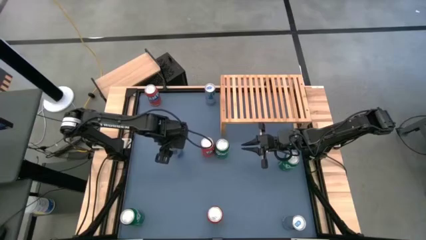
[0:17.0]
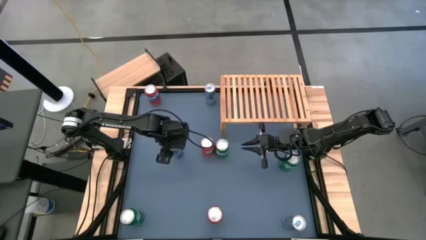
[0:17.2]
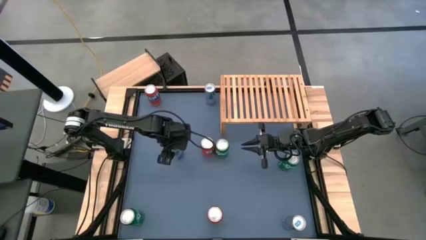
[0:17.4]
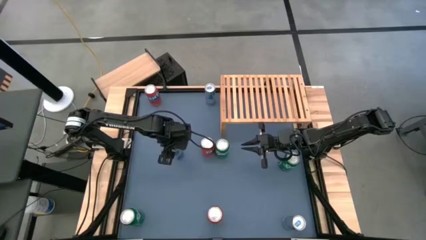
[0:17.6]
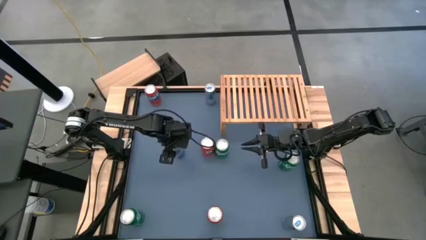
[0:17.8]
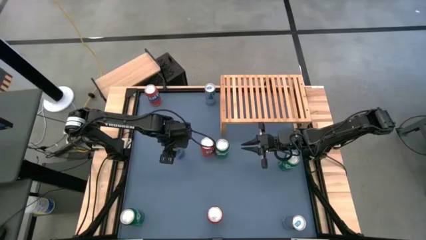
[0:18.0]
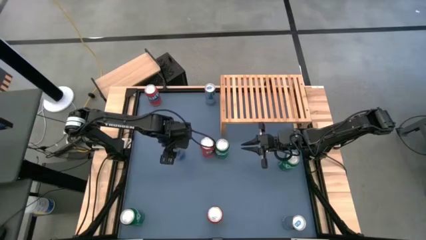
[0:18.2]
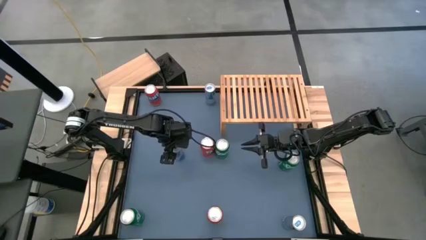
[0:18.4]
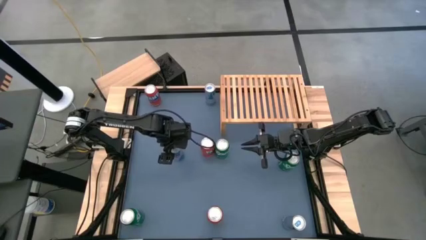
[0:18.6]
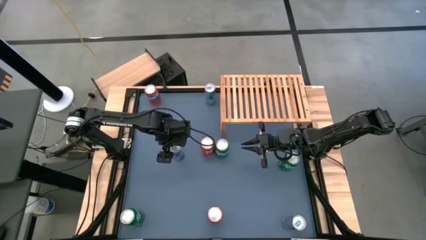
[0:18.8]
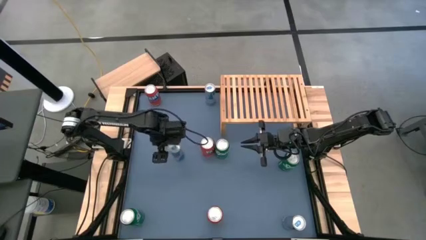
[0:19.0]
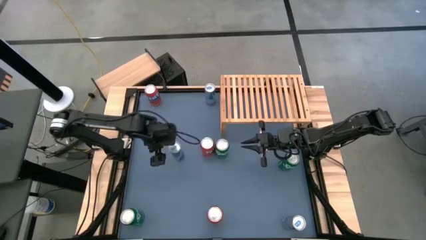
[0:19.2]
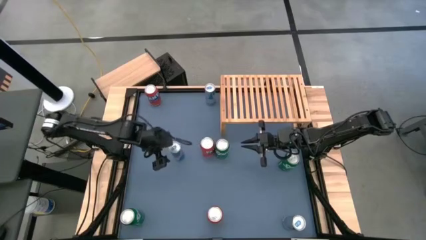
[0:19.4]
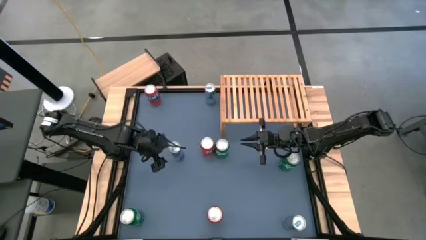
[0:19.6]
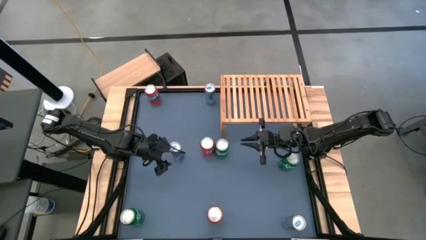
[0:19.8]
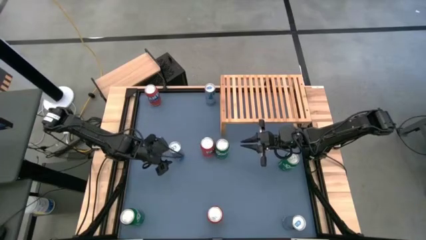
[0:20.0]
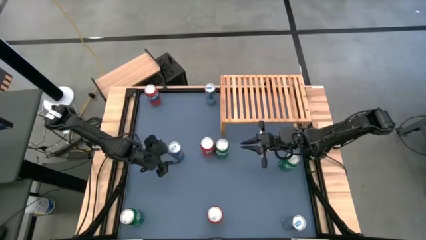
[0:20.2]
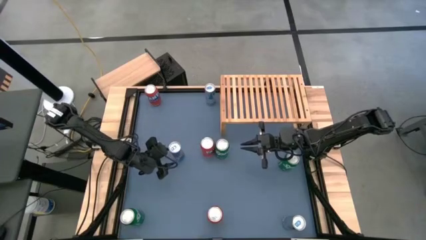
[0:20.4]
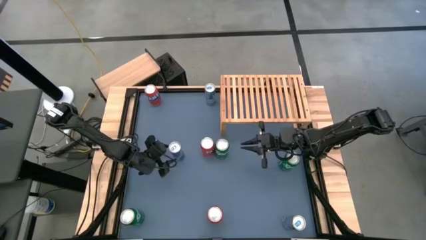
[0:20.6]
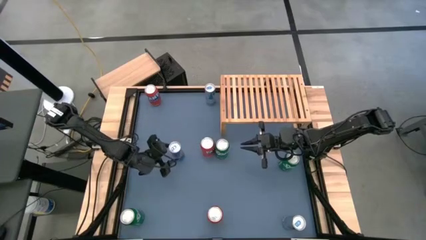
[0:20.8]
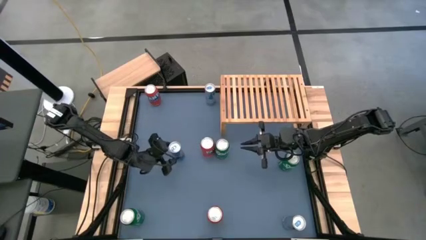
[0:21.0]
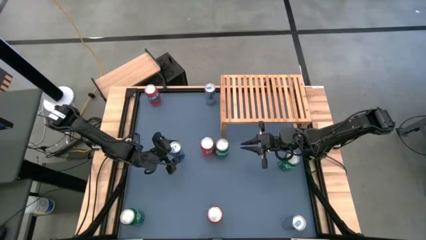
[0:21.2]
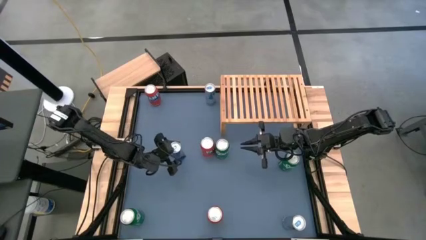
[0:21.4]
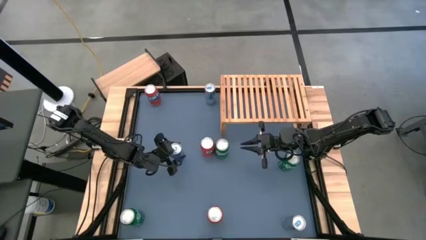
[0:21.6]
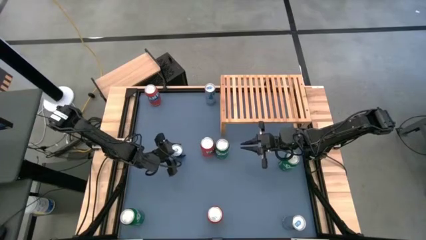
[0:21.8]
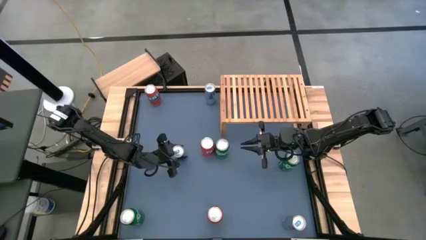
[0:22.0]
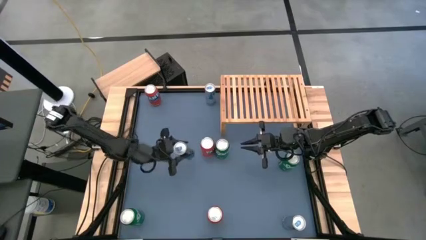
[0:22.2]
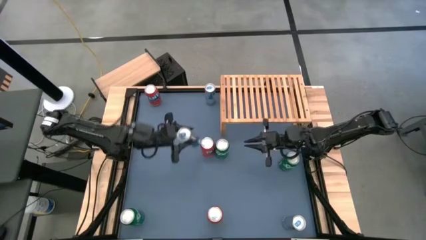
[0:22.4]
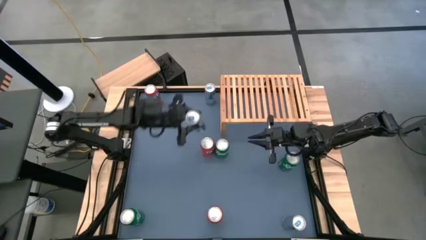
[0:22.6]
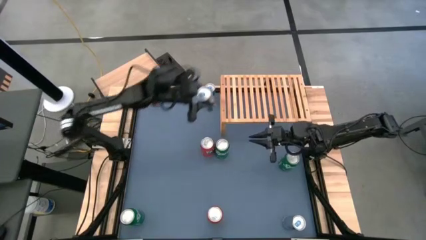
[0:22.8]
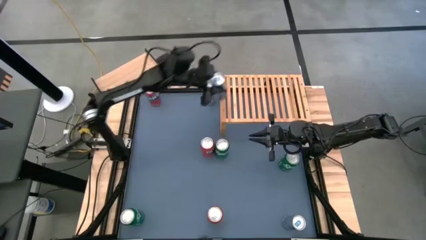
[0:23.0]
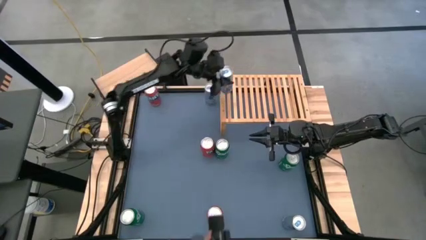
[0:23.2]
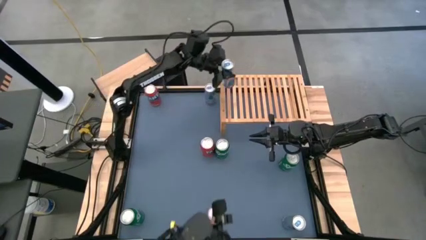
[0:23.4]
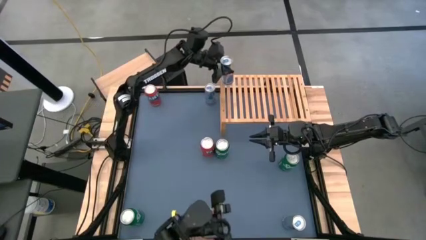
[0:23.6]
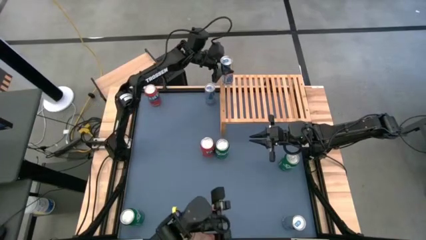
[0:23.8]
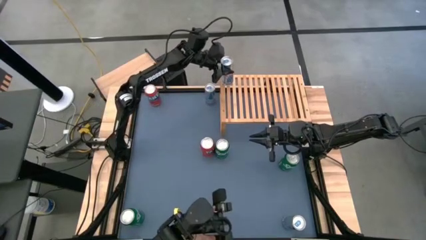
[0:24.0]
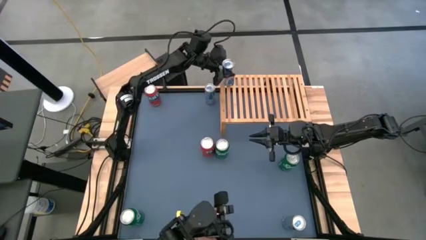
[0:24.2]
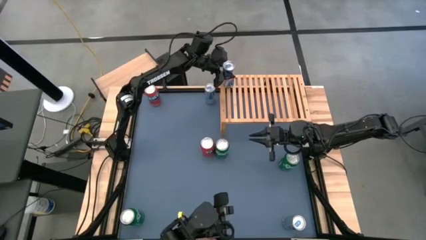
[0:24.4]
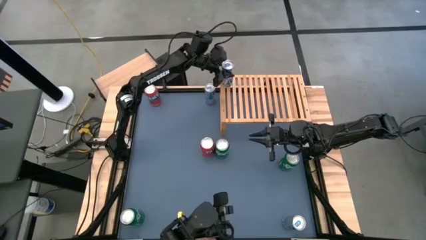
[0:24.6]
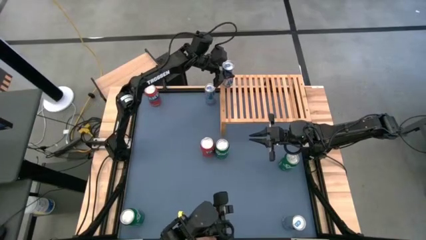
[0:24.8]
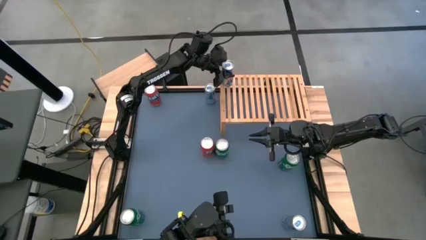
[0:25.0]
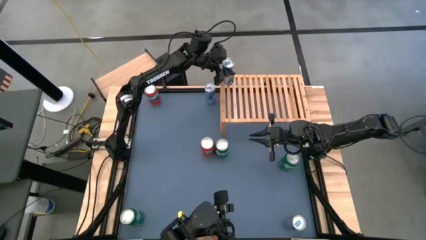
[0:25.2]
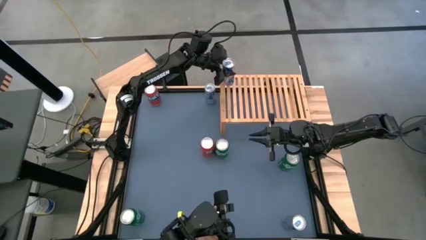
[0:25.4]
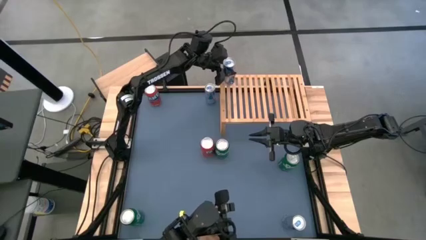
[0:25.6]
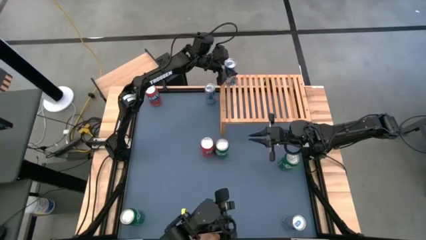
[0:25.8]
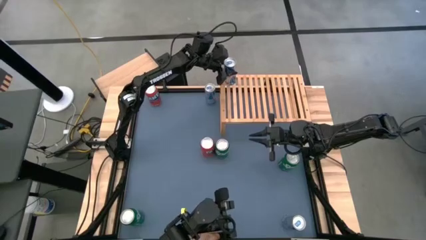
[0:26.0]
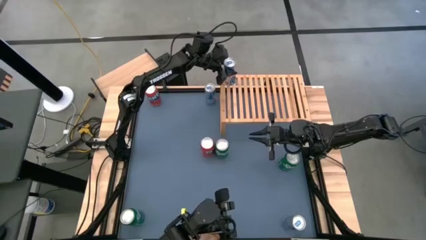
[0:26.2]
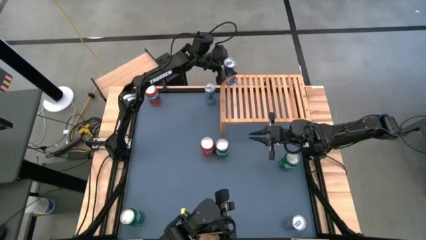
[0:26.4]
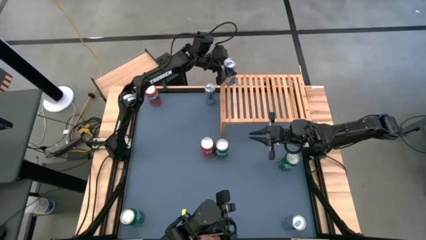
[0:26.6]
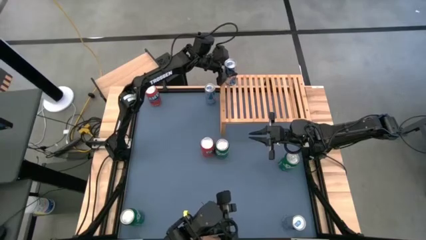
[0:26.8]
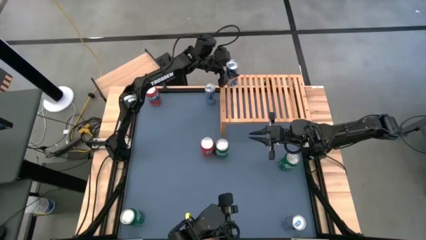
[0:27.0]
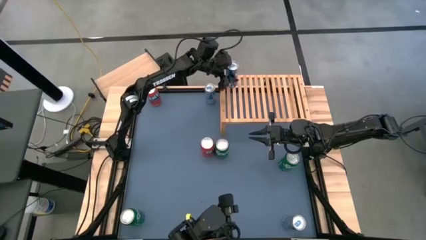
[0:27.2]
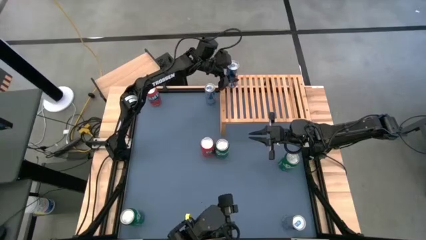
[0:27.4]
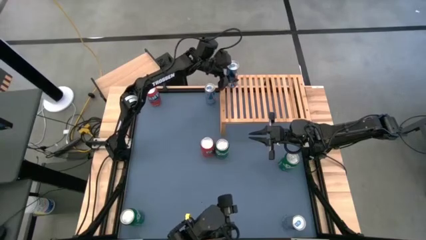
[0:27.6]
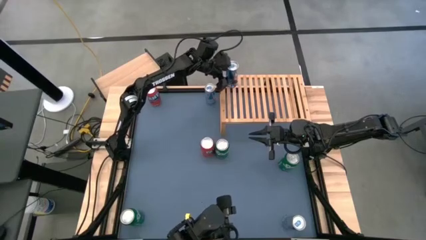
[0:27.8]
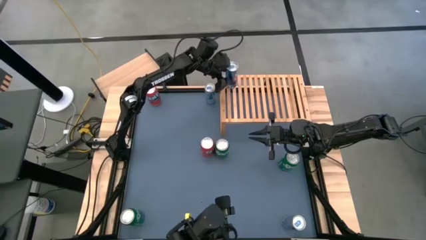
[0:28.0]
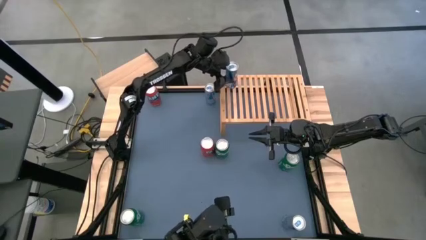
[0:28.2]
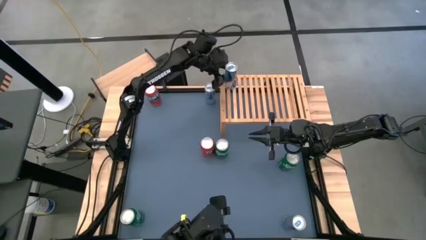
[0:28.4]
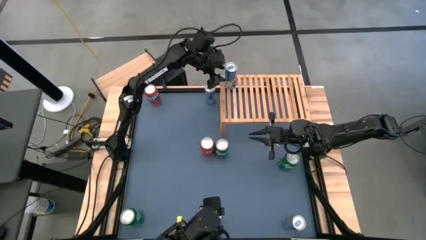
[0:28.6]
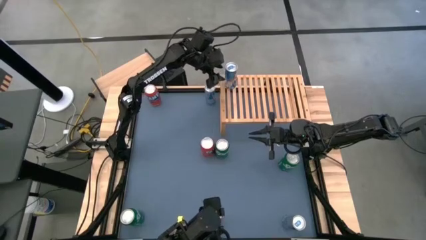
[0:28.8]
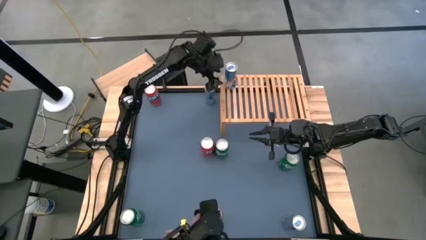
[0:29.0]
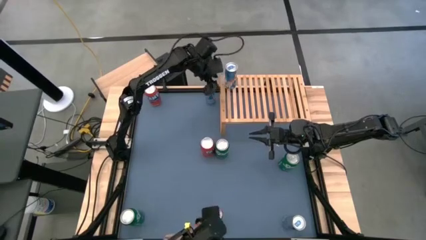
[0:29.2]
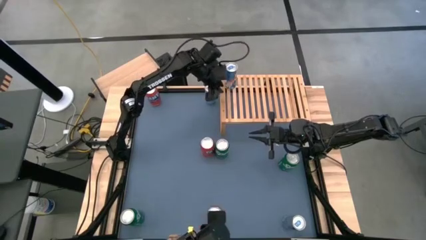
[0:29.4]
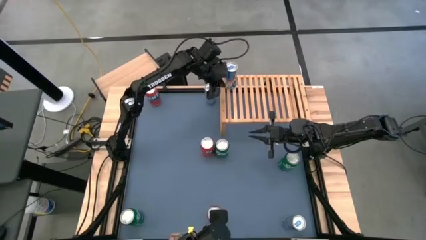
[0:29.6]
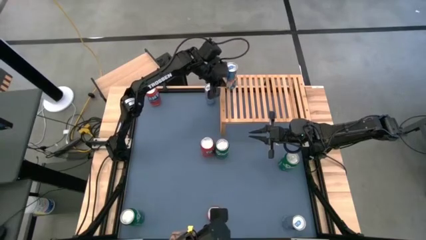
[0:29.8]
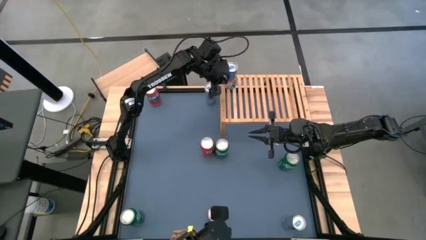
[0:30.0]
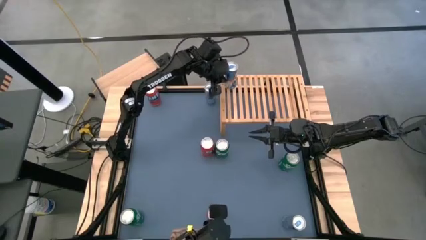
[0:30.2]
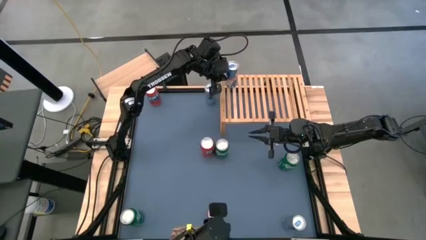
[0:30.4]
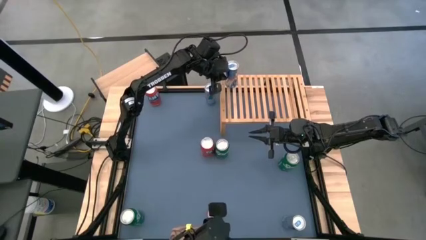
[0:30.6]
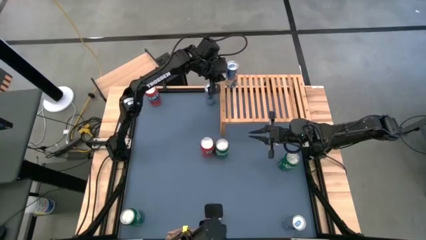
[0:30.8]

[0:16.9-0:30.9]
Task: Place canned beverage on shelf
Put the middle left blue soda can on the shelf
